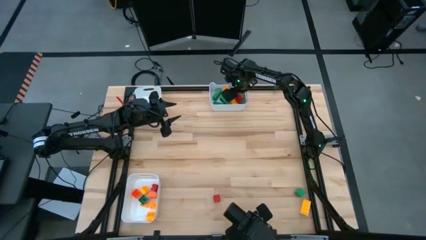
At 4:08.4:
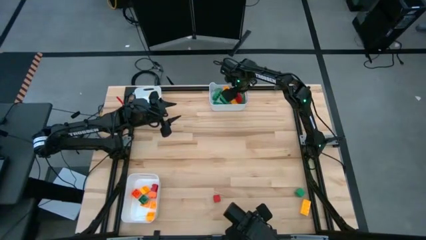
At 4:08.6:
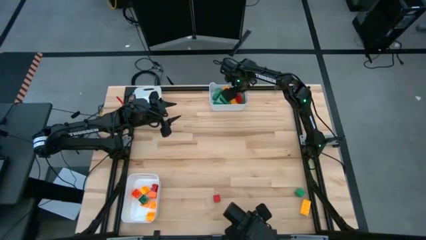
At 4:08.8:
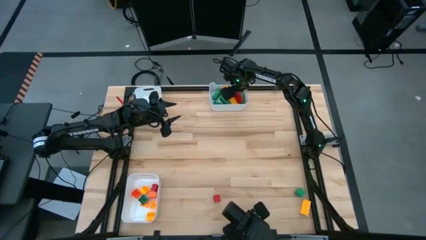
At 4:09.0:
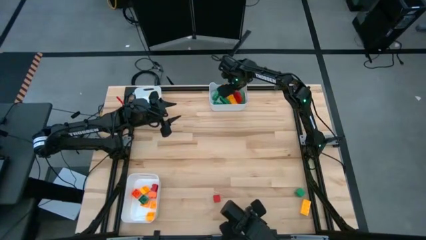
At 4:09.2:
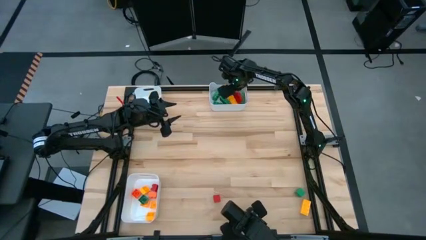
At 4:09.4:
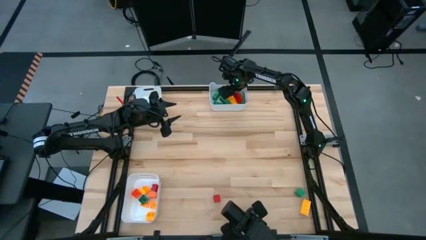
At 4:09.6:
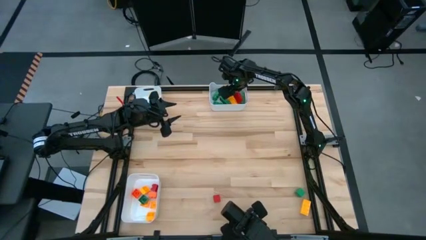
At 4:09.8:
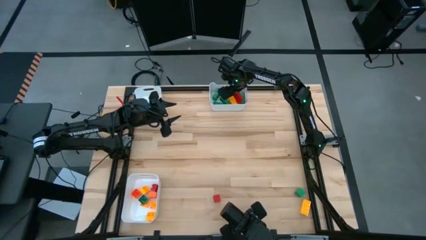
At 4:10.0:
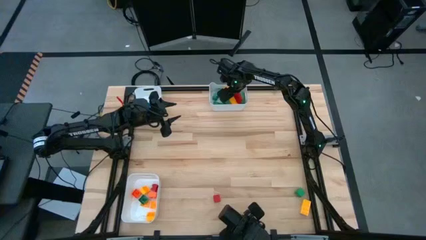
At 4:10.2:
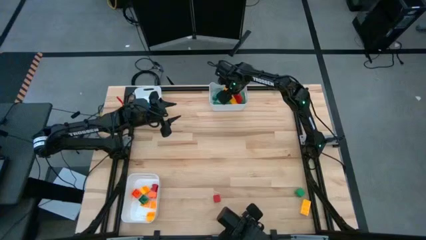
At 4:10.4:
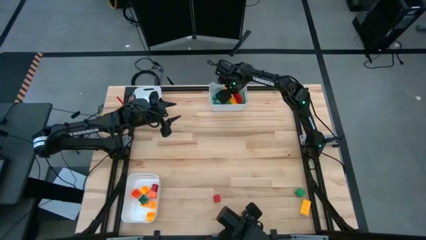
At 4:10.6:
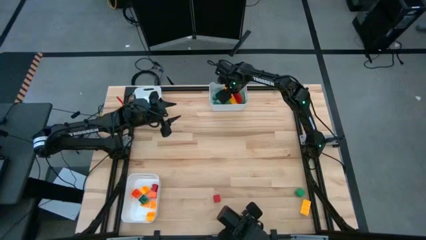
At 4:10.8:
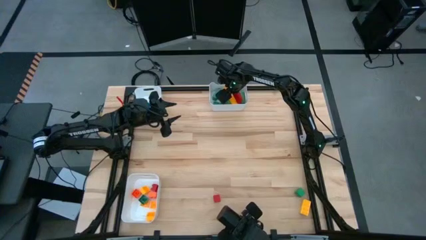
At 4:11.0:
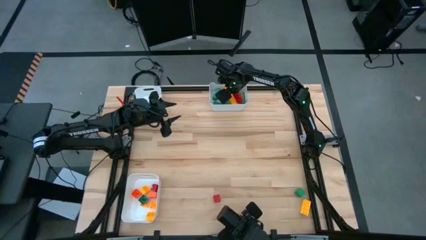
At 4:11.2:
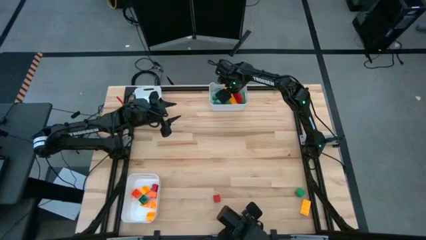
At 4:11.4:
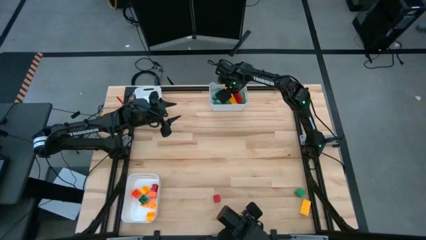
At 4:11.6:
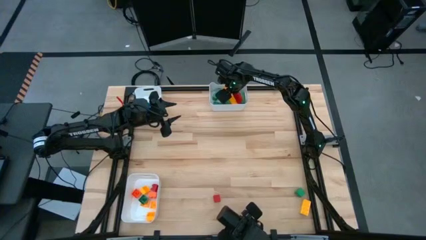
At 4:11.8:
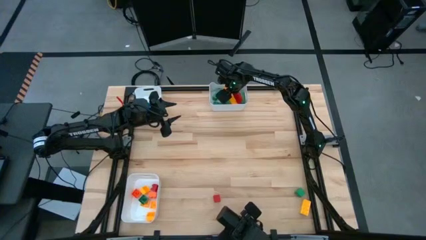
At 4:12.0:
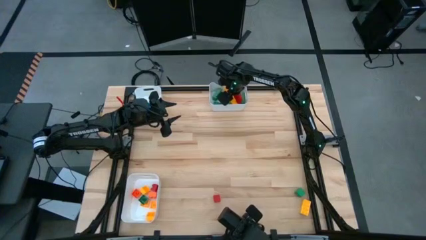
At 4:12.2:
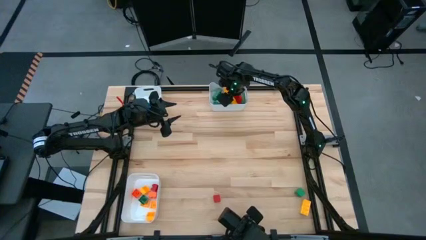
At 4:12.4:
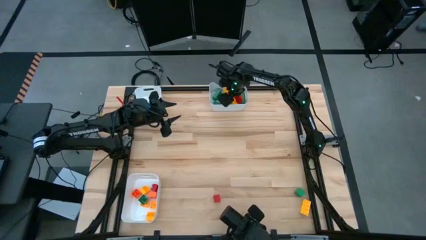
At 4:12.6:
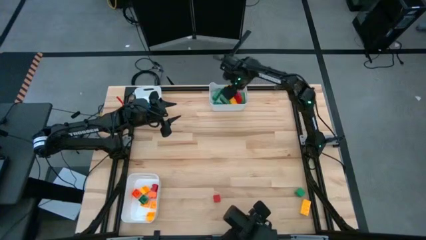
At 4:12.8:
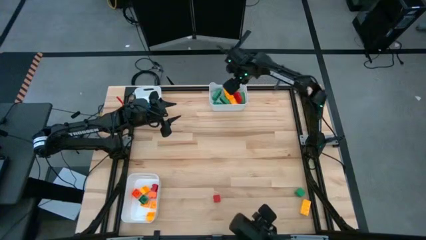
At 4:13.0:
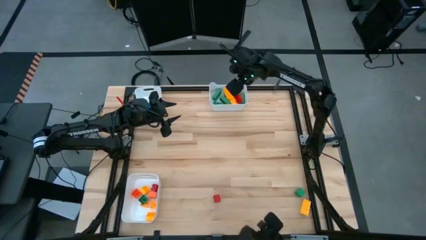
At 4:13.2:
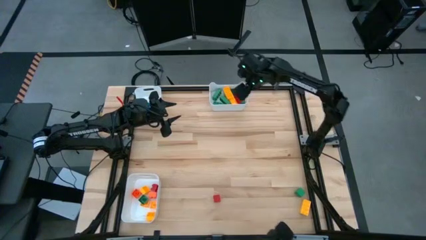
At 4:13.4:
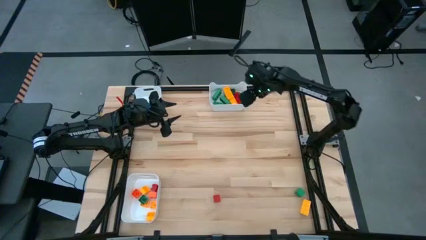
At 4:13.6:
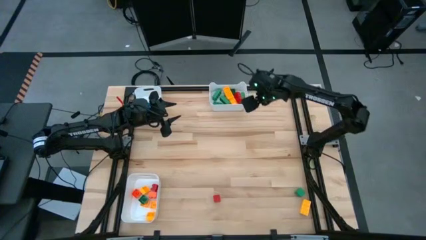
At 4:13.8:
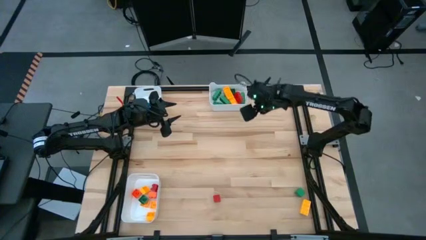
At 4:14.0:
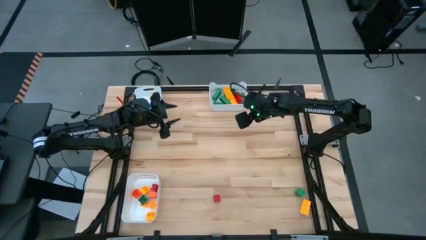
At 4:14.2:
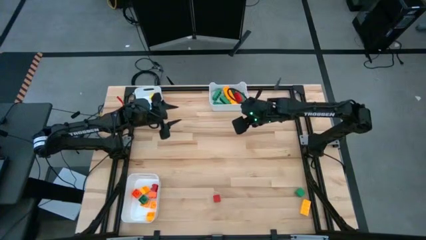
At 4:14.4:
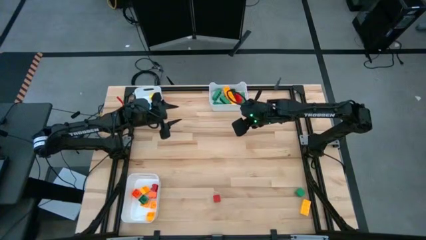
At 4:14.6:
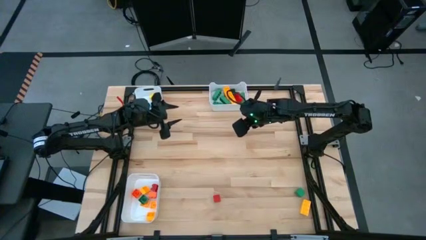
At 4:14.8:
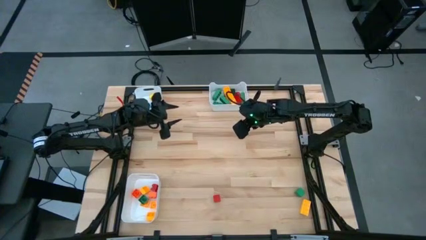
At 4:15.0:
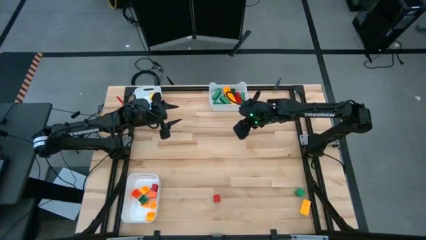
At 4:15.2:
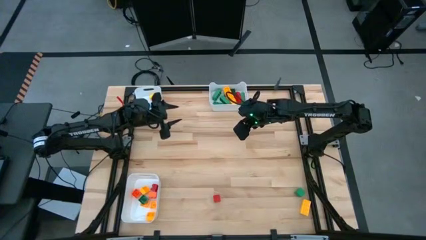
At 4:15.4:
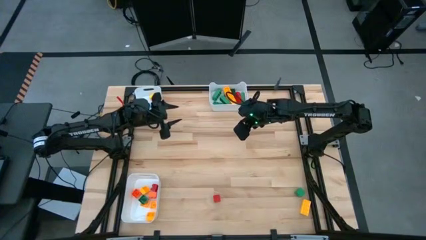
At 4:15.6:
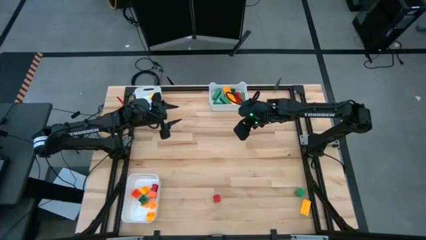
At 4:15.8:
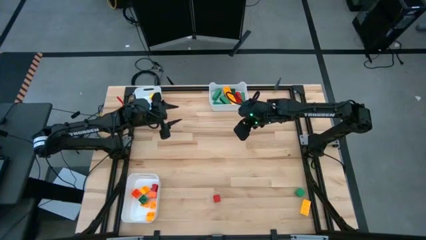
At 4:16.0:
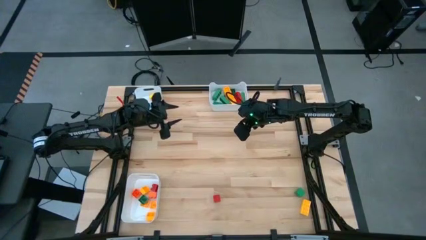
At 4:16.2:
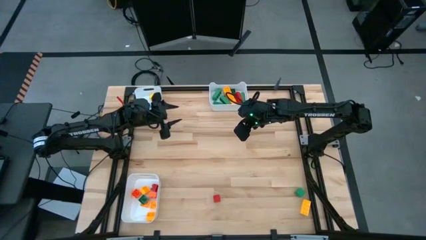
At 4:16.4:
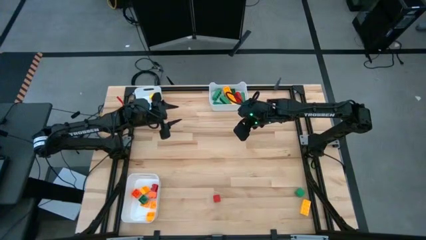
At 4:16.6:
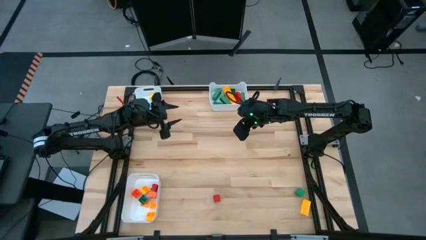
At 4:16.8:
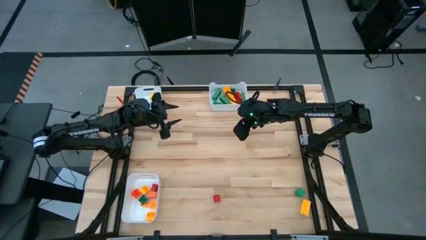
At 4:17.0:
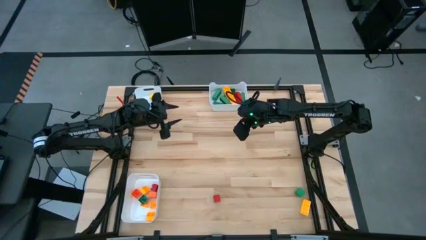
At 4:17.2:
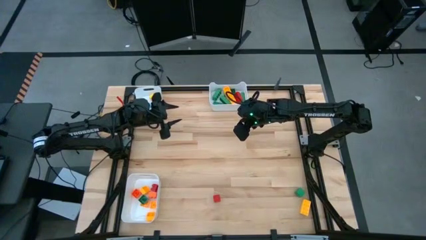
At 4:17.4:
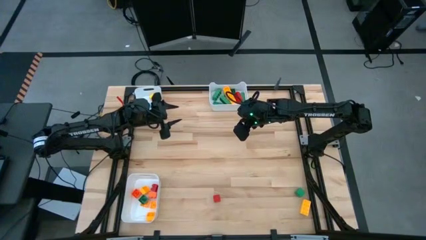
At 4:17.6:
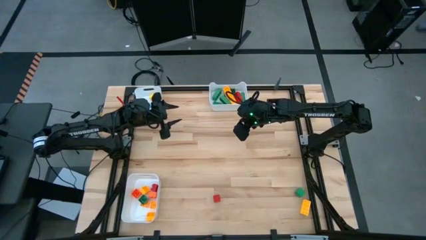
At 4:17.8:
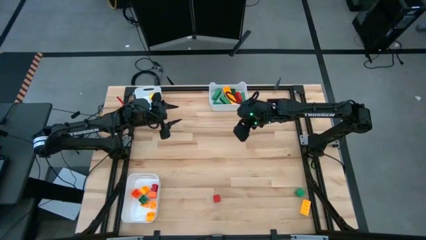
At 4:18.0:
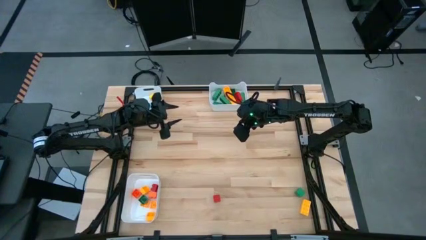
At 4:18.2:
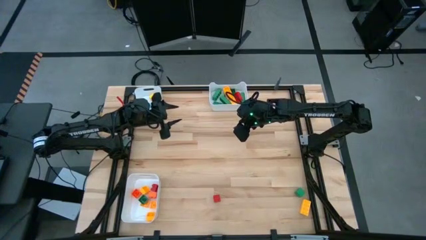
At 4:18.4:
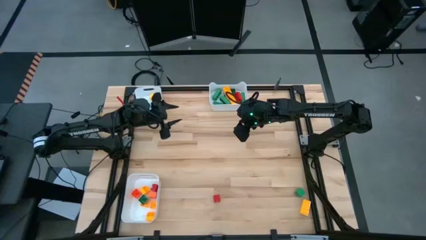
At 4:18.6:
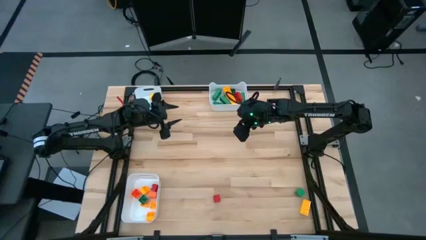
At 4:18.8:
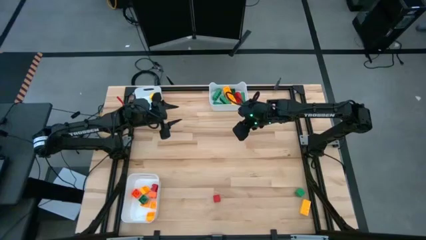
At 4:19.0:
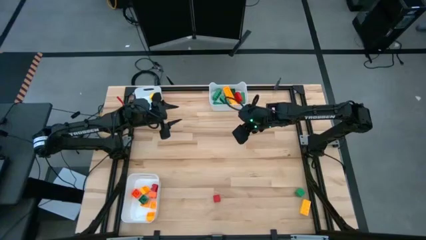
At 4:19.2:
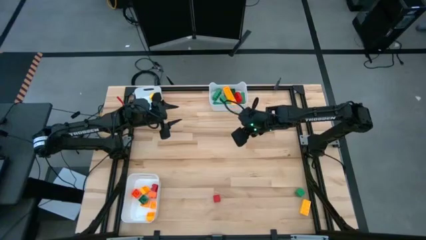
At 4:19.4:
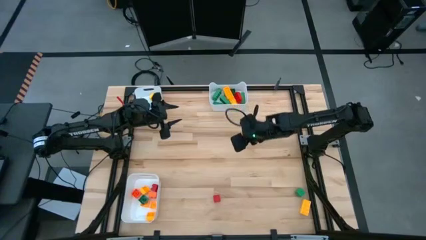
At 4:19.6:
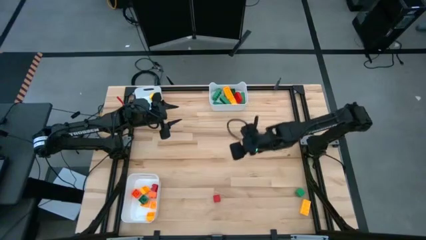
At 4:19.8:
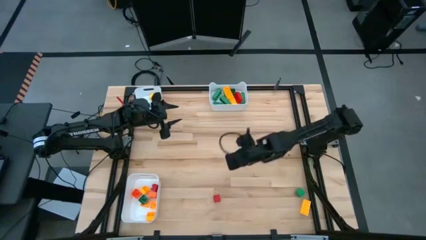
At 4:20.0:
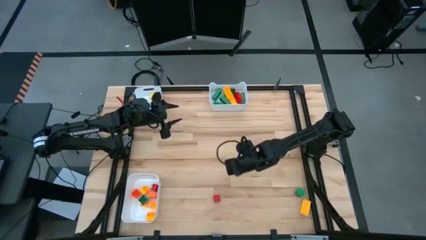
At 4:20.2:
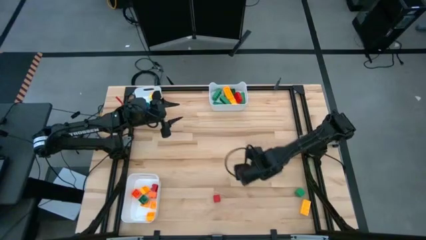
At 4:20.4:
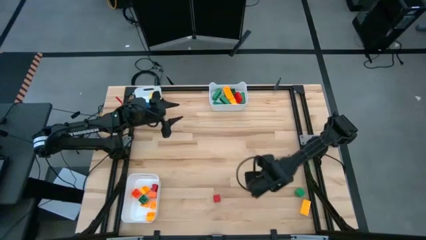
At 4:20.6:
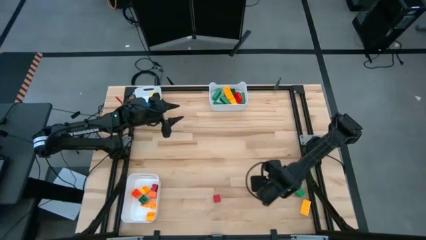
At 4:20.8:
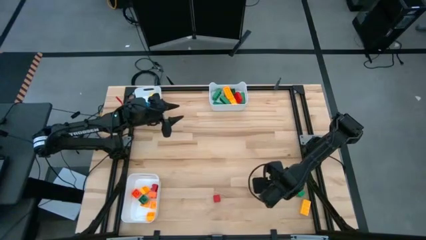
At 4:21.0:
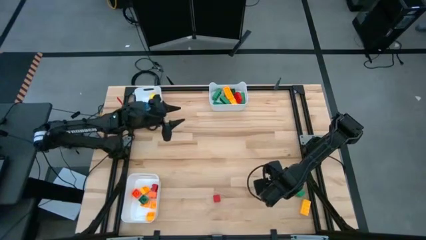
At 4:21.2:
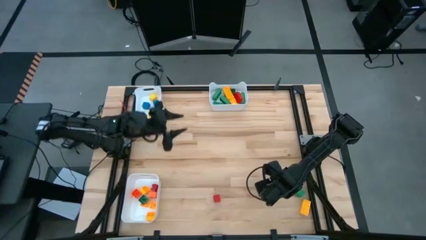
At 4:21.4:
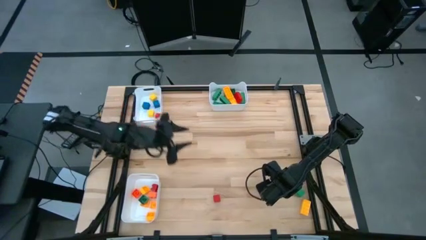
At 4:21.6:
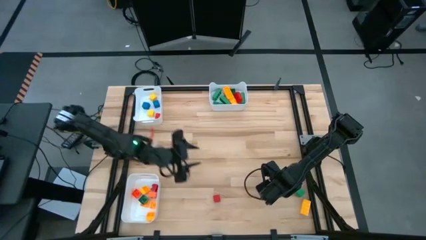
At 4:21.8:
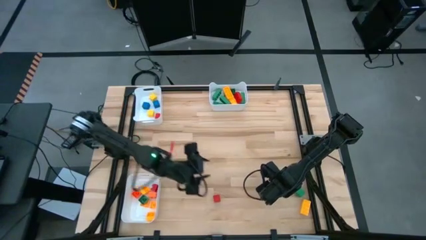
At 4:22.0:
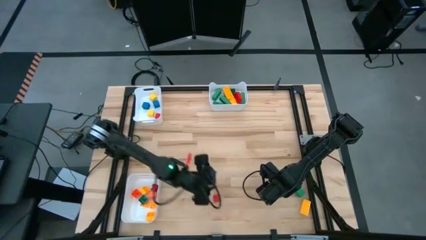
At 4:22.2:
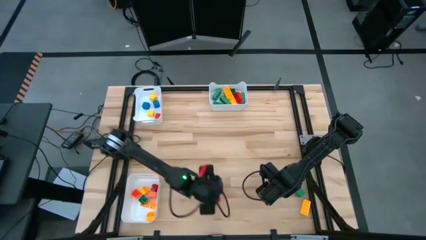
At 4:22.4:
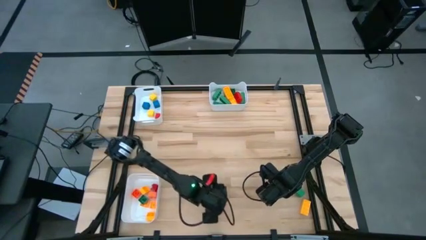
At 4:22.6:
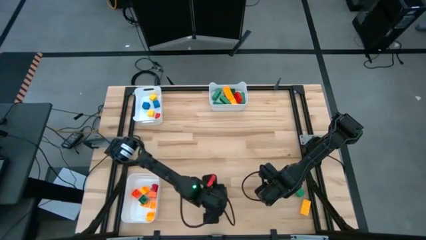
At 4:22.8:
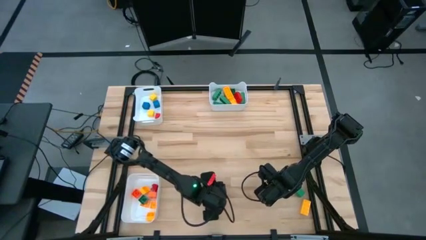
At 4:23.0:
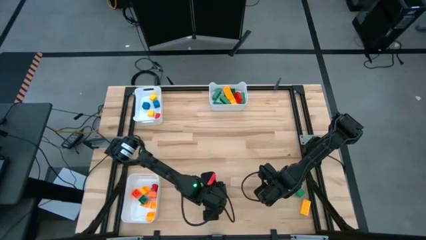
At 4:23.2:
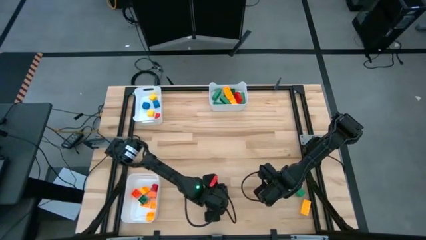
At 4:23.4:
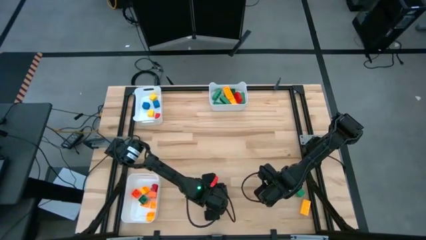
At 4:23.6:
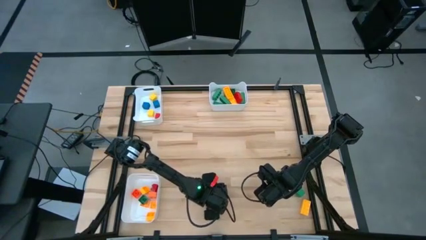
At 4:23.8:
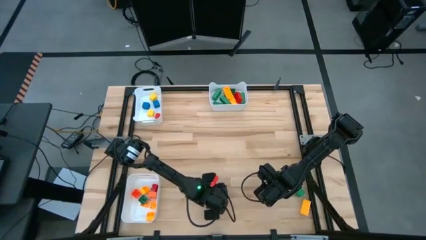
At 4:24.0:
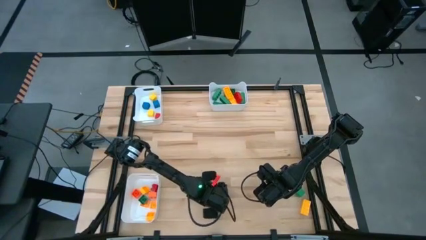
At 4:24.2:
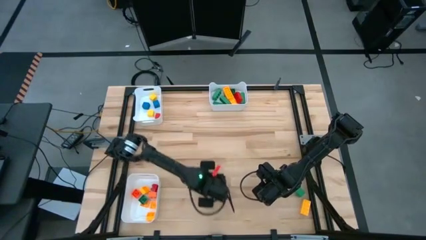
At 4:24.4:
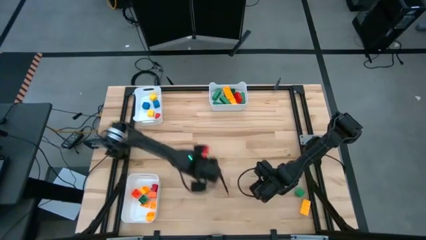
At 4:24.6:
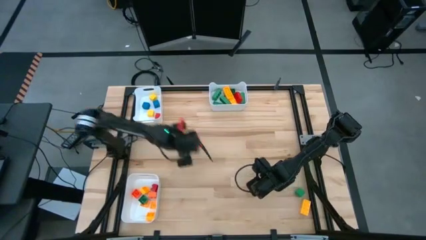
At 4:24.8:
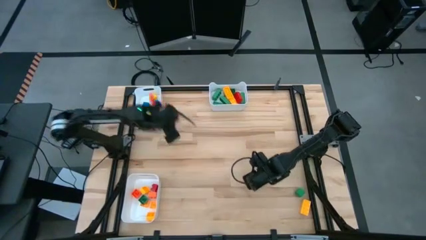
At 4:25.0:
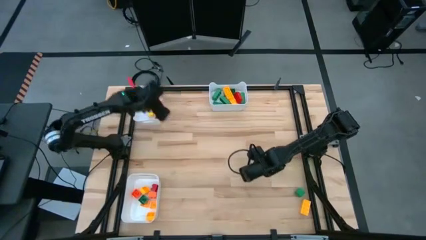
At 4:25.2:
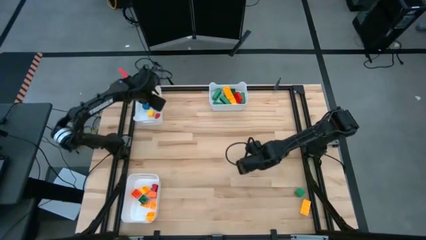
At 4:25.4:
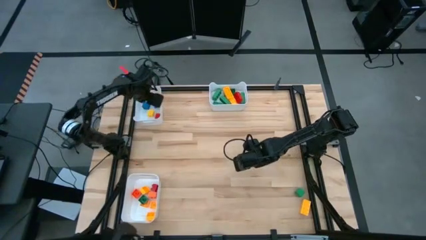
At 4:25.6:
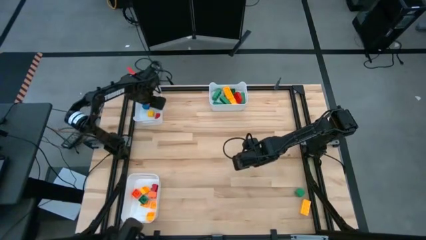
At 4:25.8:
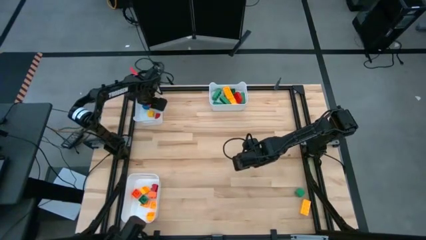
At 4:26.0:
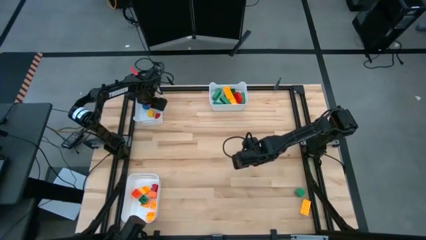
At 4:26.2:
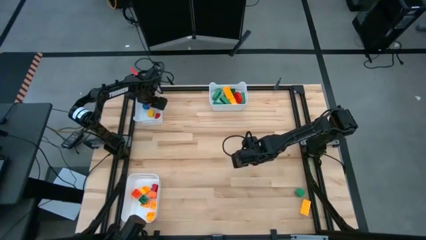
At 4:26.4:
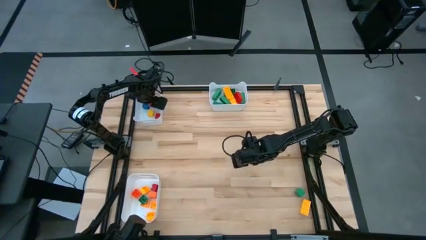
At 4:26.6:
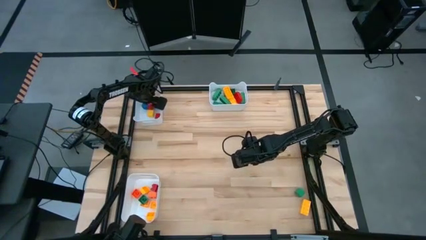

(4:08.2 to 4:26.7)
Task: Sort blocks by size
Put the red block into the top left white bin
